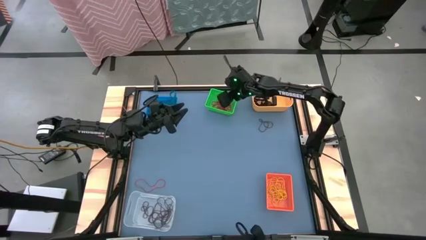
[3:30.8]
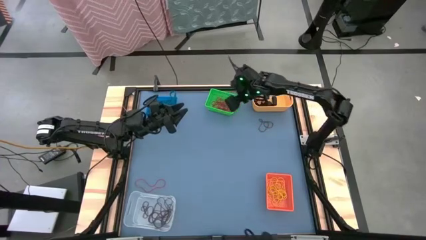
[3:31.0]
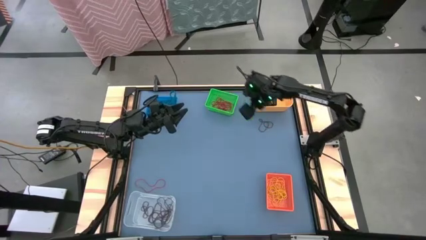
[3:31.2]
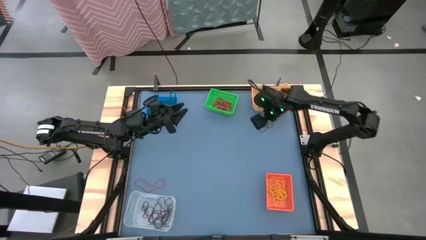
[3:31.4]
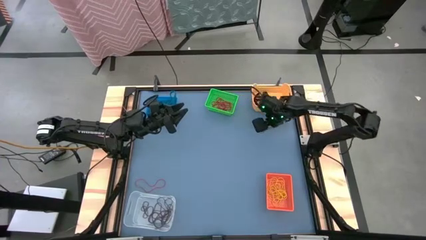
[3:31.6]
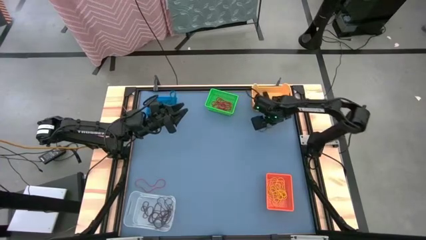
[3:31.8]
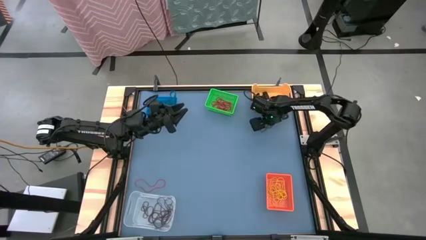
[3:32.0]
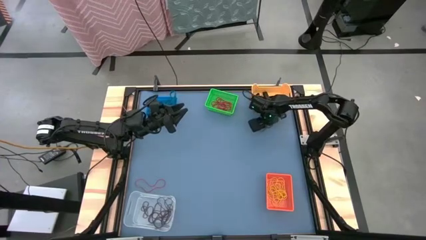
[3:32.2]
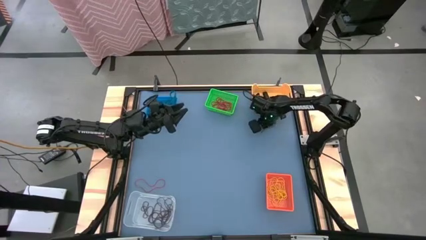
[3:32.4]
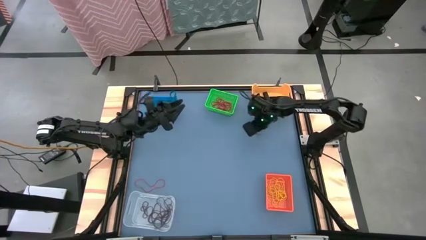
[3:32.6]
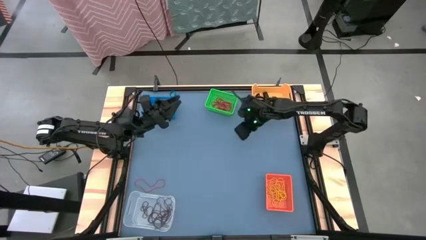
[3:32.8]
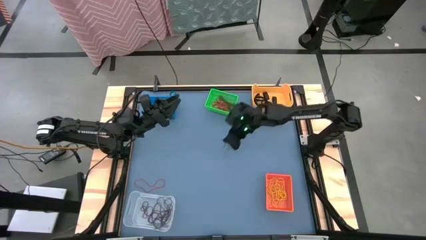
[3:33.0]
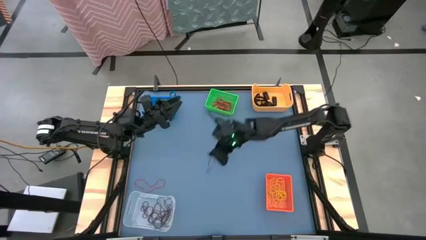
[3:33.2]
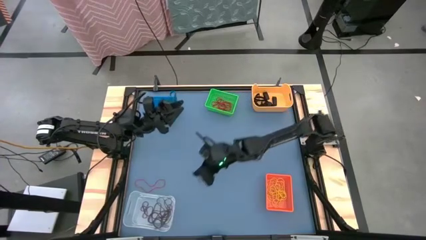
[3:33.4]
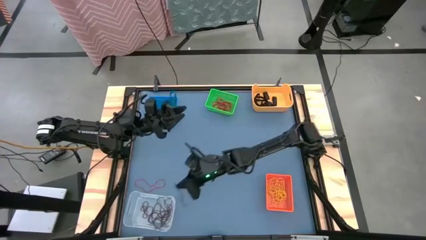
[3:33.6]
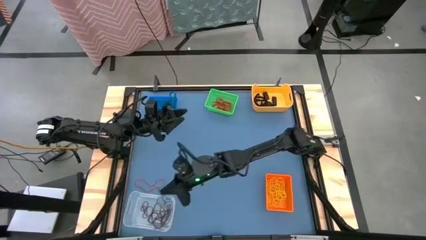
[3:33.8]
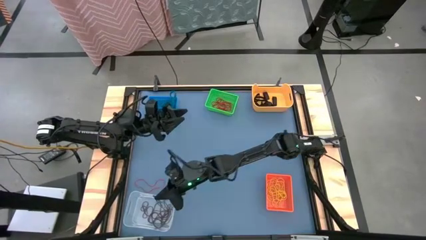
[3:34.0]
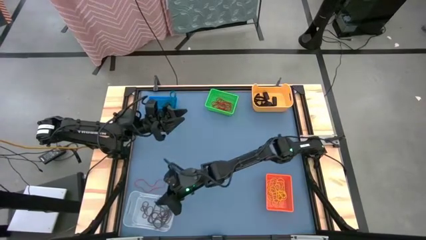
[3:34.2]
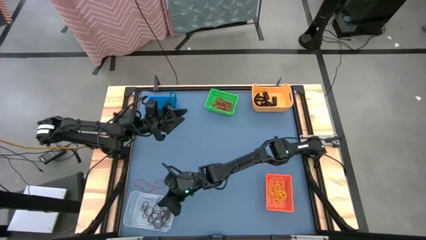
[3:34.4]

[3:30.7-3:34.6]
Task: Sort rubber bands into baskets
Put the brown rubber band into the transparent bin

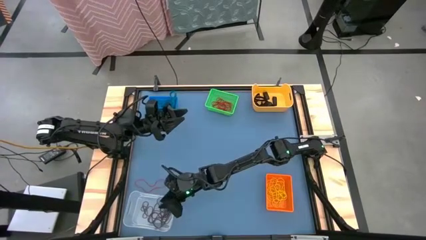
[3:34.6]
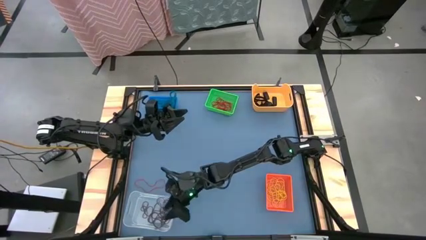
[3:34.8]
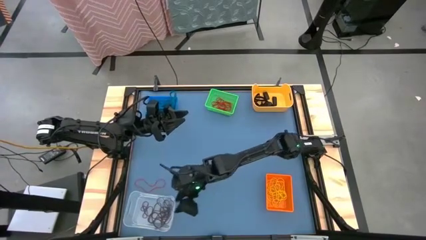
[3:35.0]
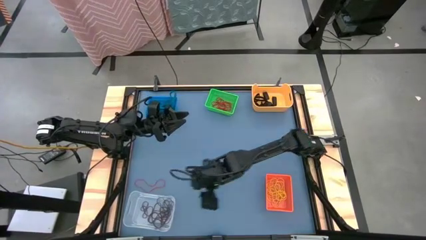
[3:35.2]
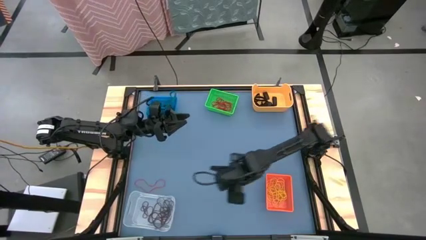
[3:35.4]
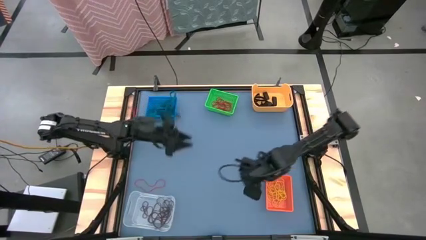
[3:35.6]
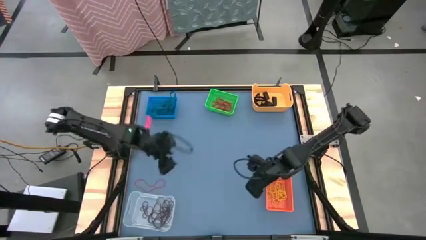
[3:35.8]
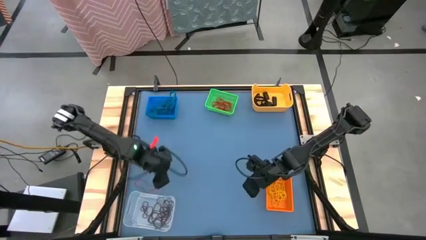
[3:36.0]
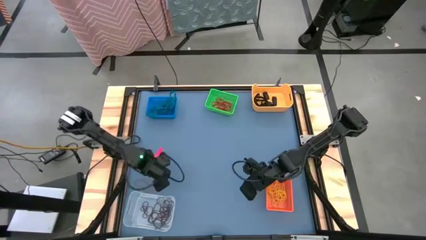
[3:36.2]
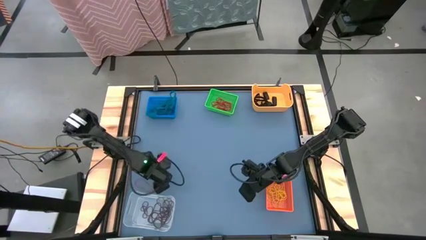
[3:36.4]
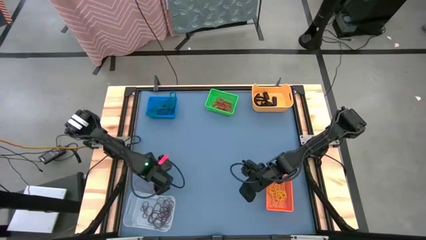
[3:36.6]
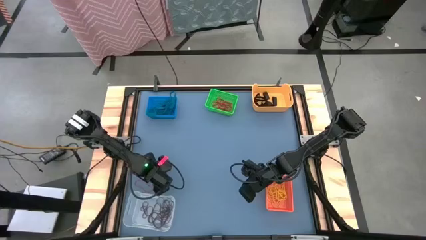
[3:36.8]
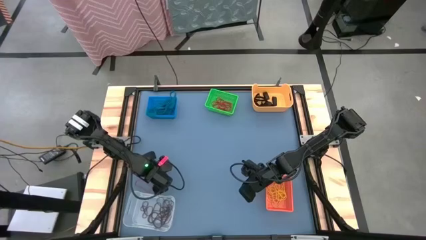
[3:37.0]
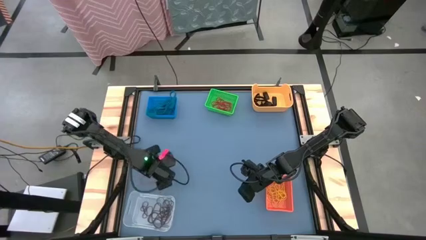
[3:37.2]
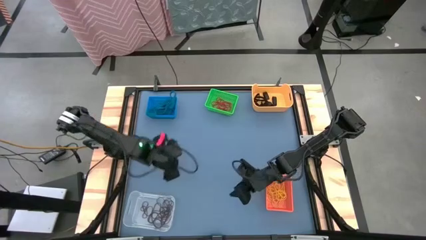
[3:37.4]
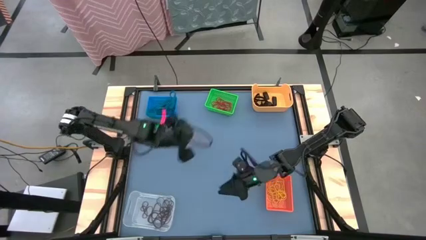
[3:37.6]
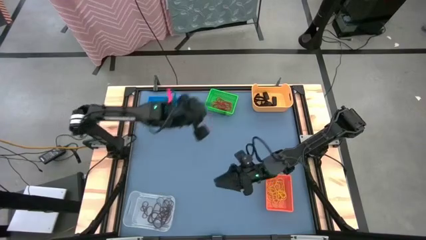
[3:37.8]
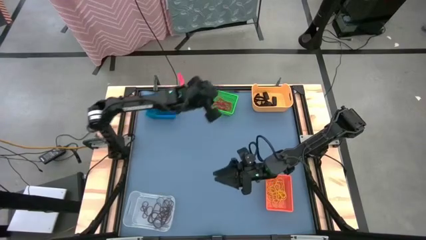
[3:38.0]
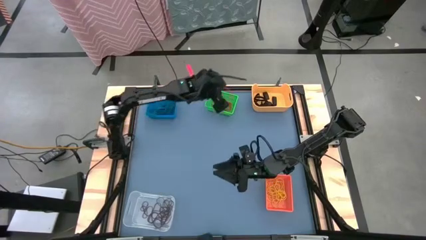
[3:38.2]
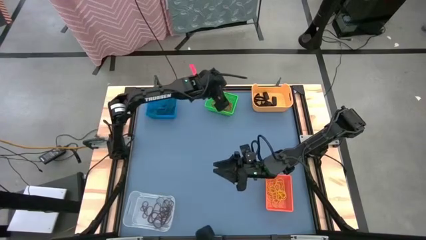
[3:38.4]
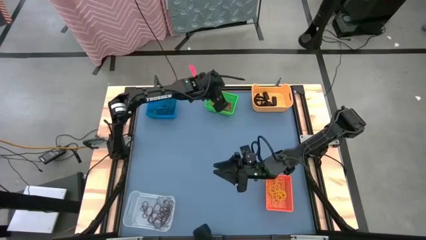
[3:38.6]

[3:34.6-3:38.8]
Put the red rubber band into the green bin

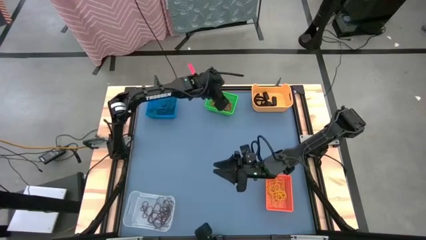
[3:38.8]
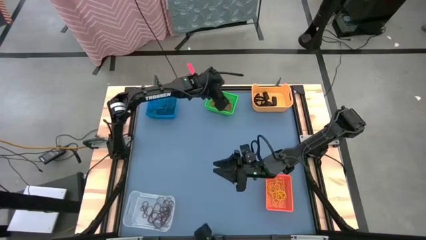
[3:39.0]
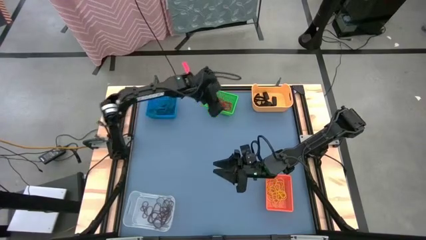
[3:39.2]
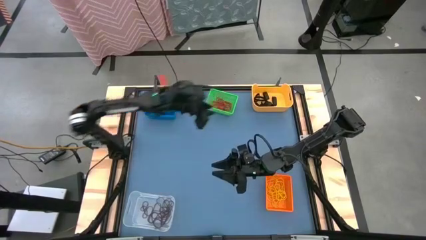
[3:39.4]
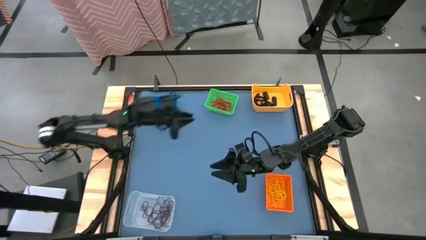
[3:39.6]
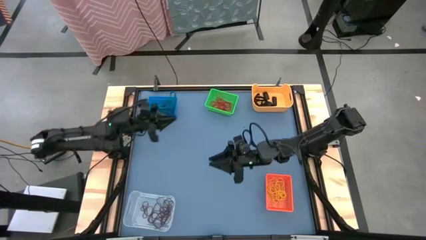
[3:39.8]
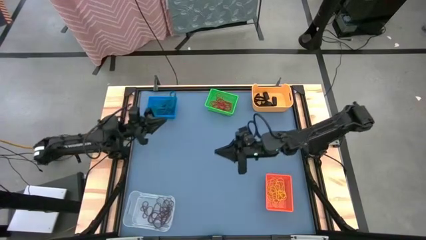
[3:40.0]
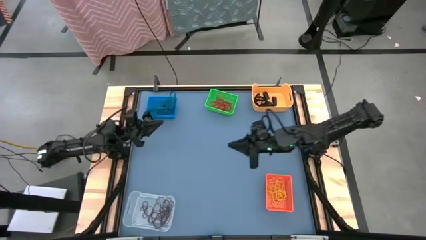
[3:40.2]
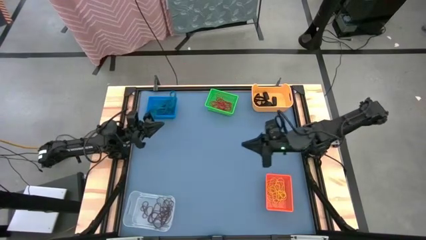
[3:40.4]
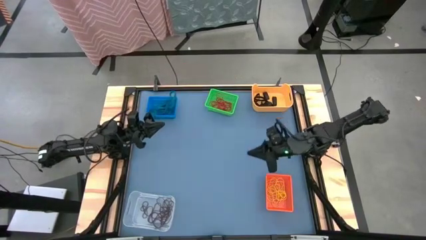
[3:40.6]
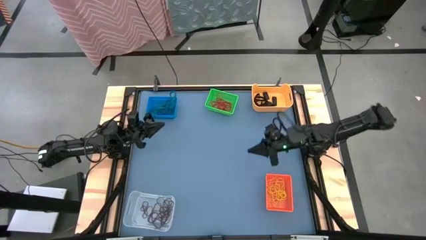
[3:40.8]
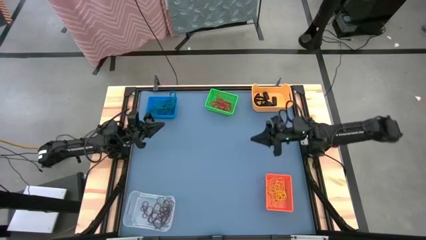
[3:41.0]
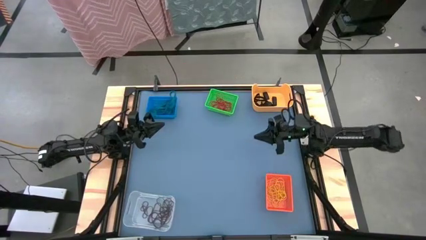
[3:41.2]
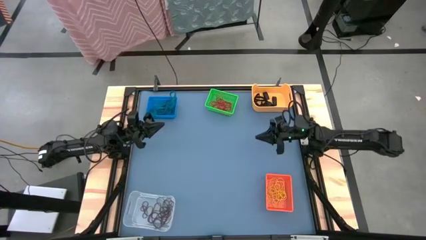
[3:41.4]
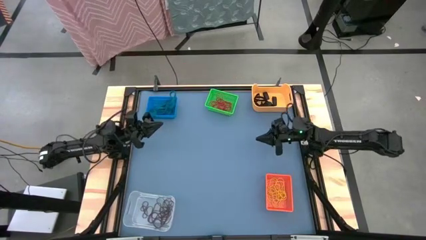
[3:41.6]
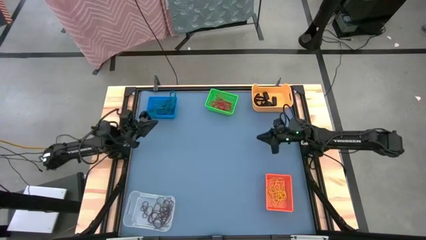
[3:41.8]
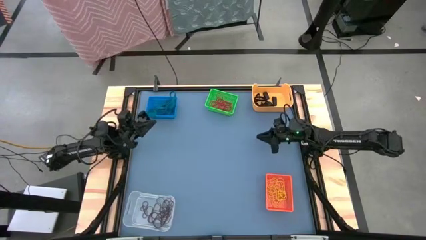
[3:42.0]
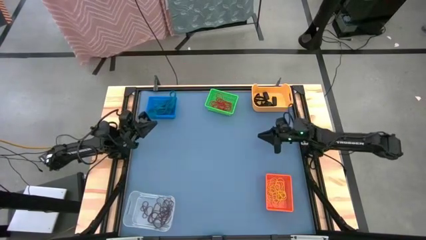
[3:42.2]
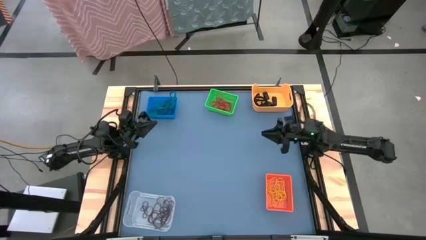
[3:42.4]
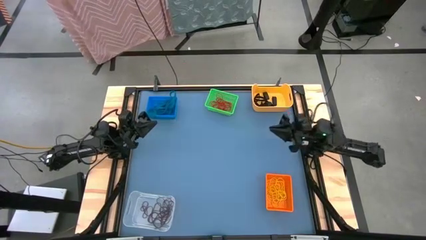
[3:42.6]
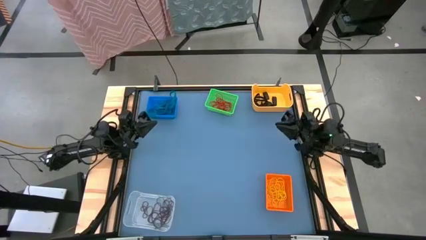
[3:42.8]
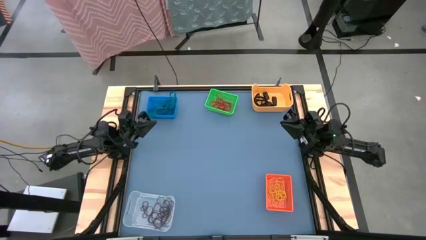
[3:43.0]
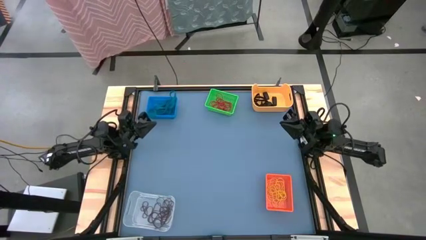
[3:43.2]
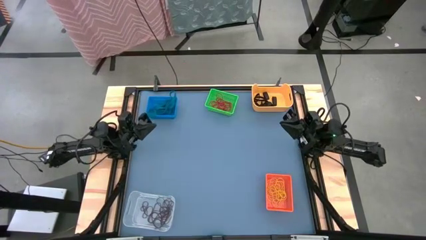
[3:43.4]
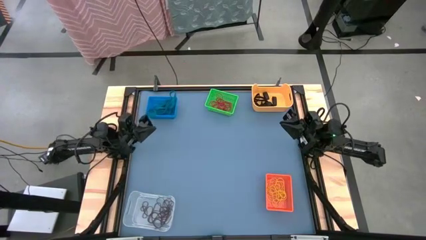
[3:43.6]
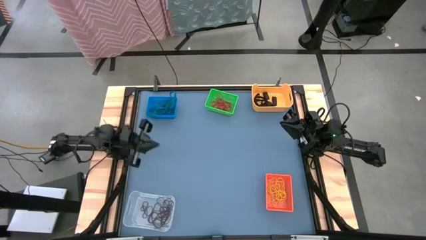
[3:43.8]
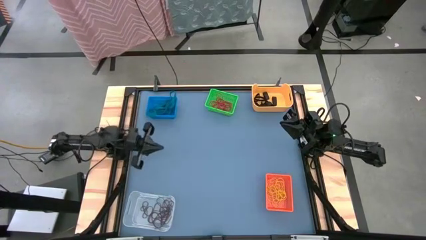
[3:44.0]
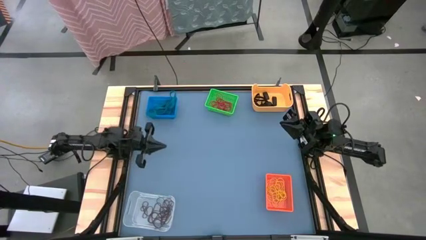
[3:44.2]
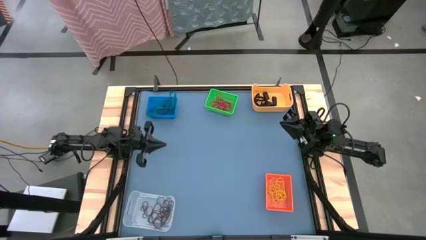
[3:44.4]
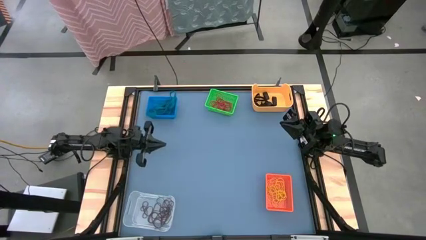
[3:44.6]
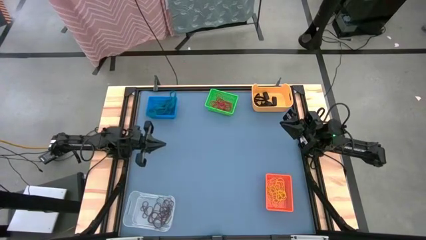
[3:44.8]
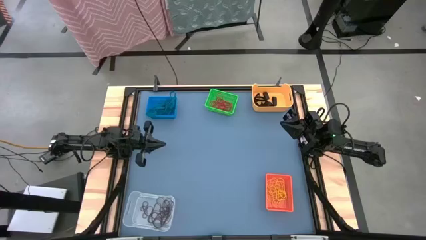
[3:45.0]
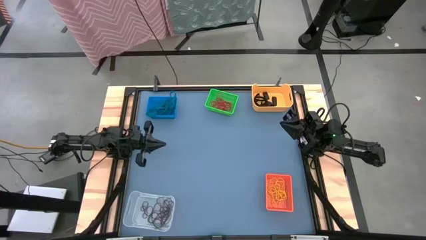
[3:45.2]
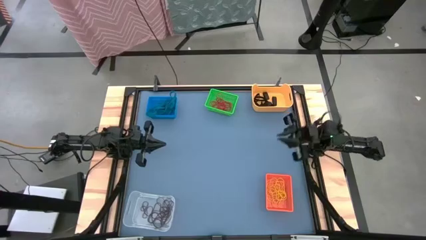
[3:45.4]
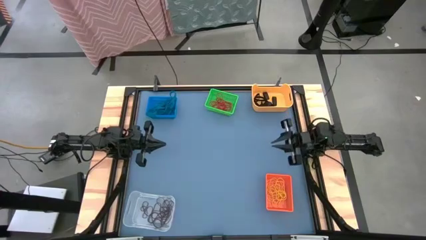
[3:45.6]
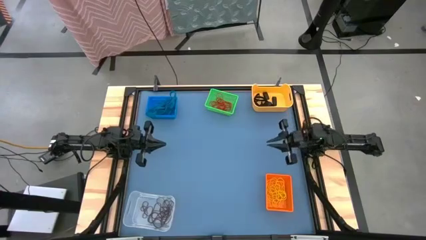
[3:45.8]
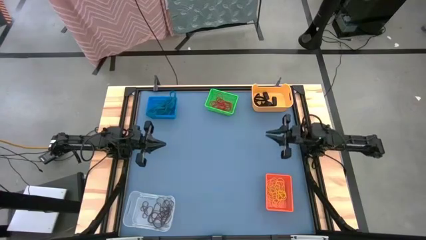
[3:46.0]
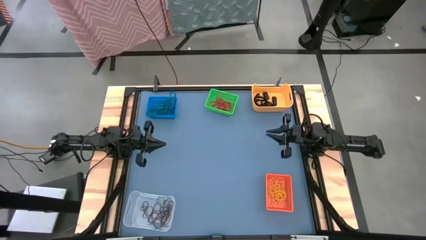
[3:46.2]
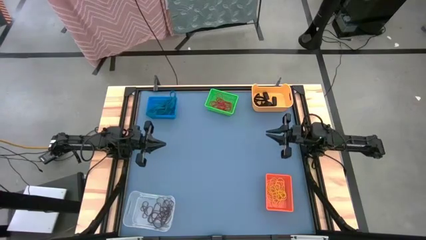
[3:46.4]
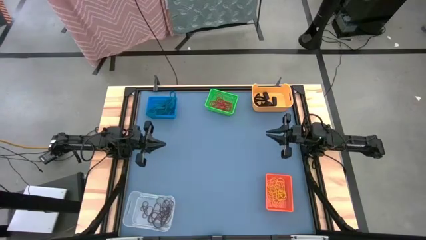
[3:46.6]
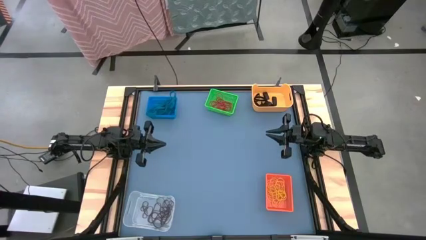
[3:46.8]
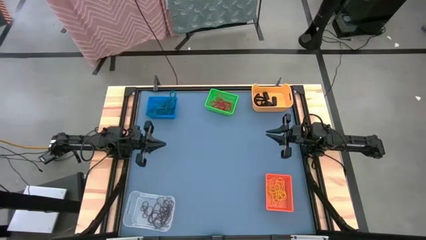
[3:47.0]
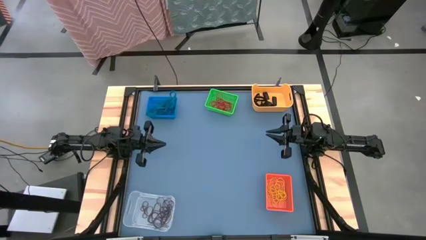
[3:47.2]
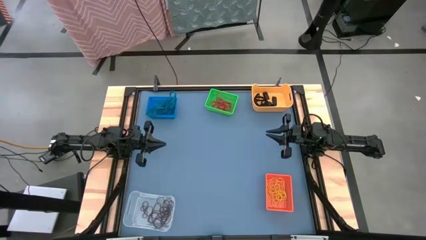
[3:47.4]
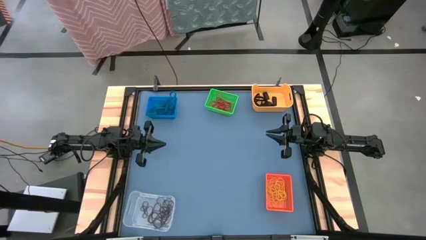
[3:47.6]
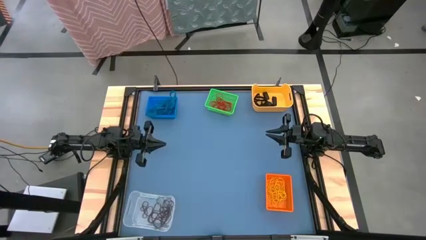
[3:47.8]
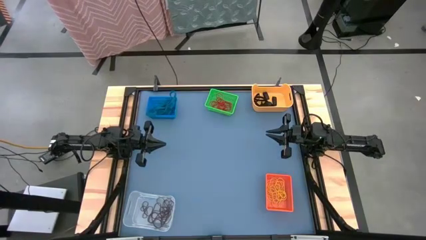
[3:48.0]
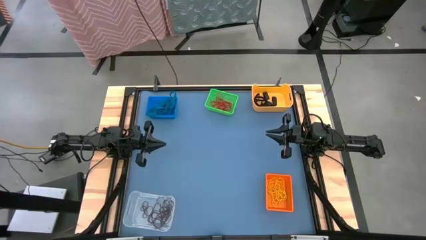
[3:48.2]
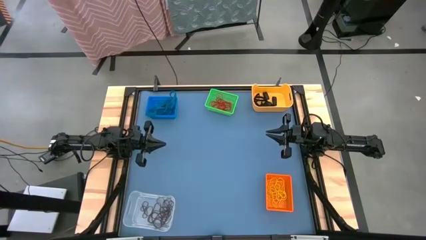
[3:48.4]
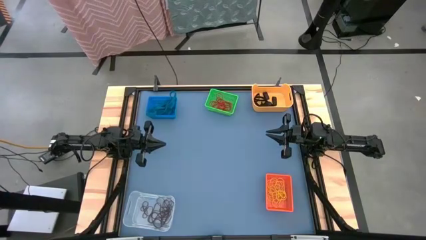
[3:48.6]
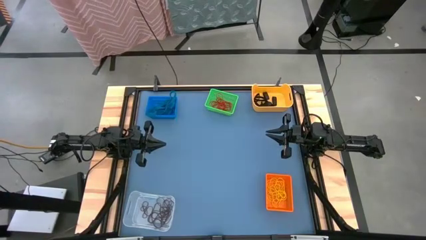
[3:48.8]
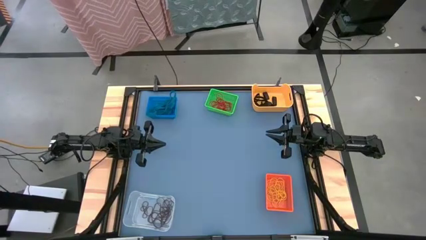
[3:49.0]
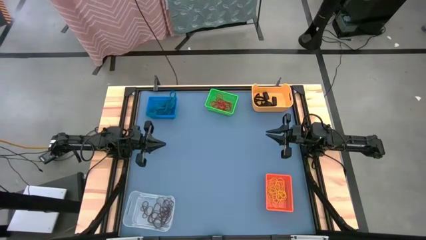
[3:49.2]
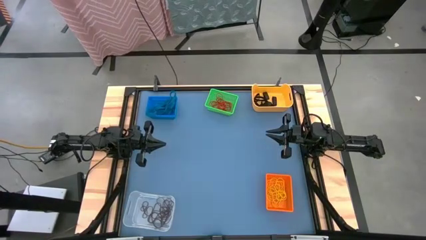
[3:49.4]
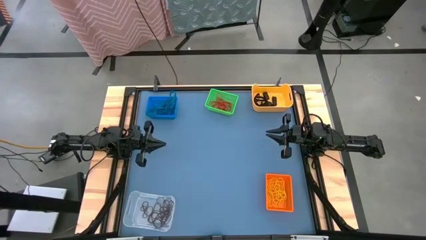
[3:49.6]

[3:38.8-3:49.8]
Return to Home Position
